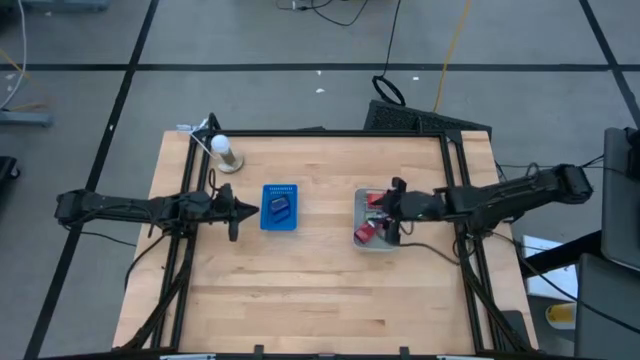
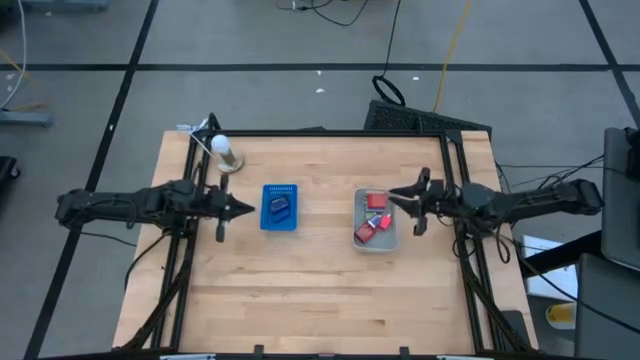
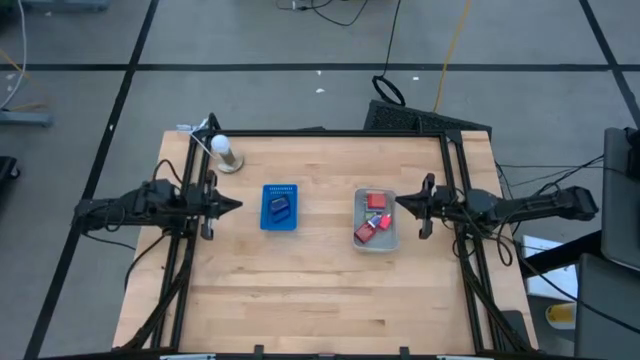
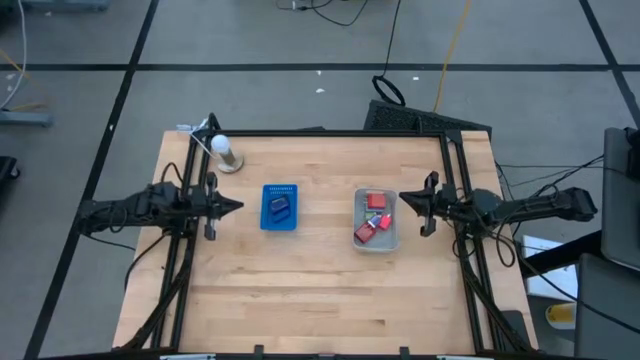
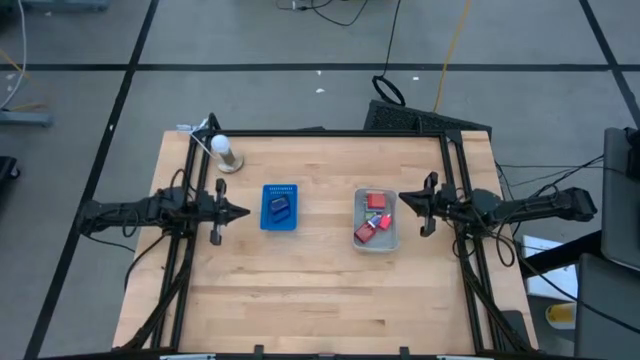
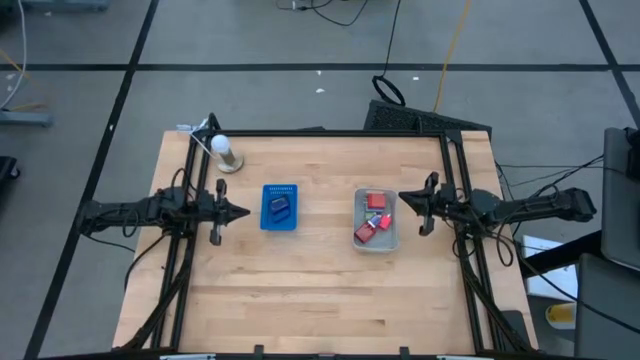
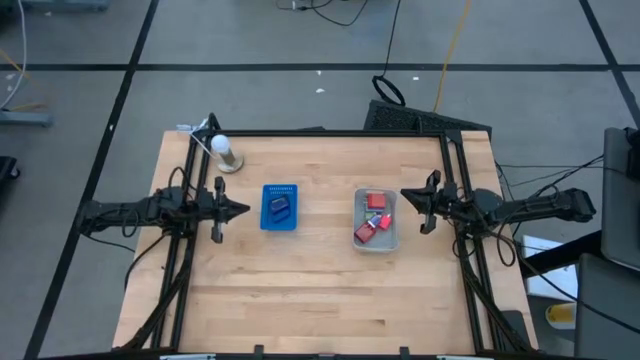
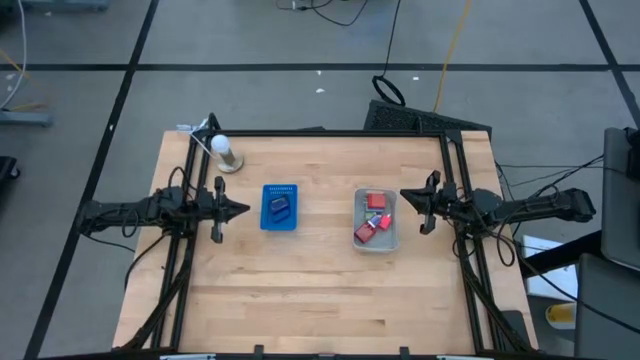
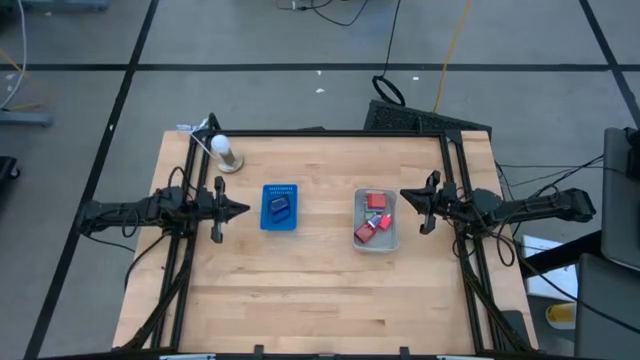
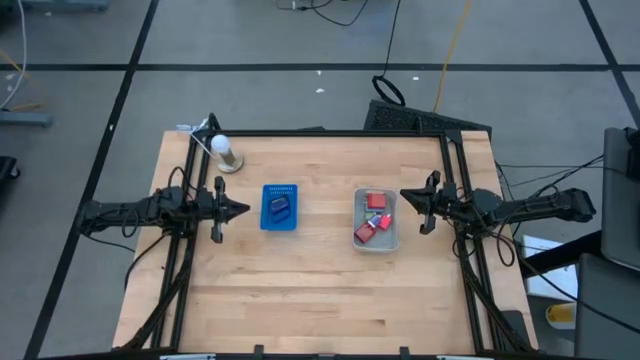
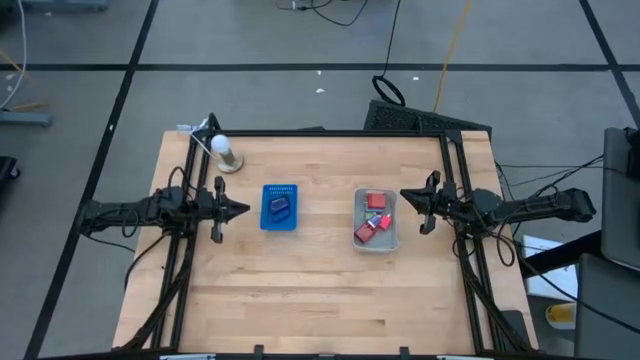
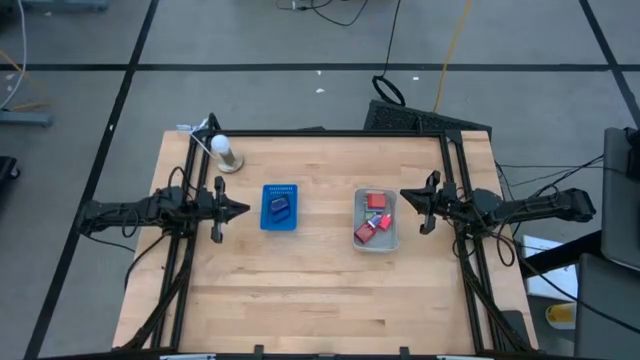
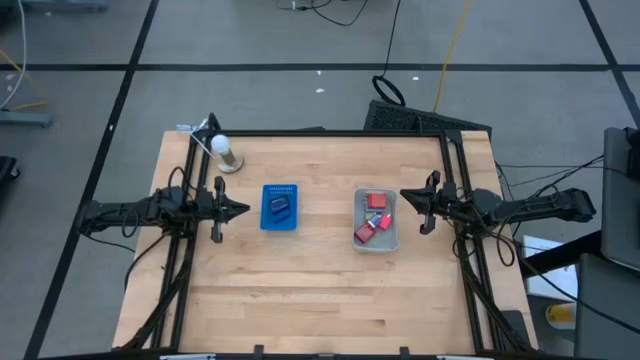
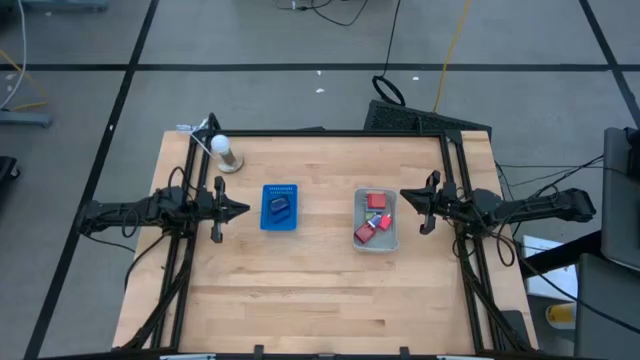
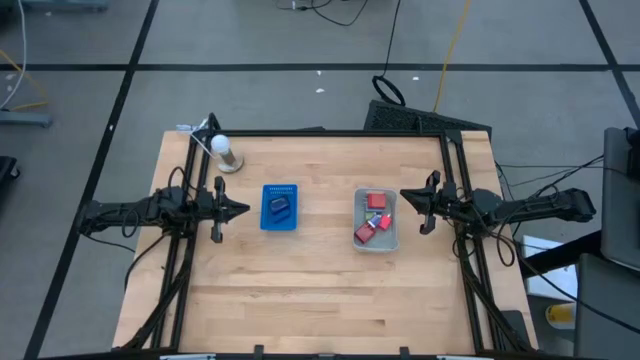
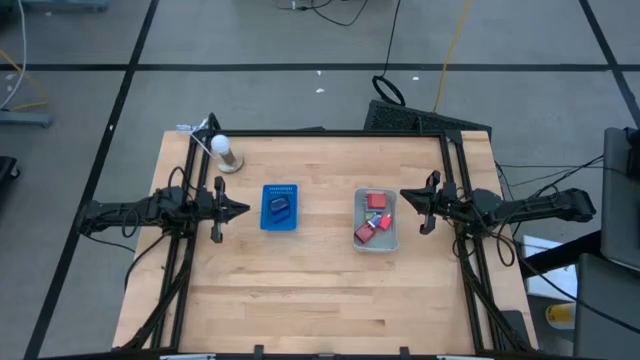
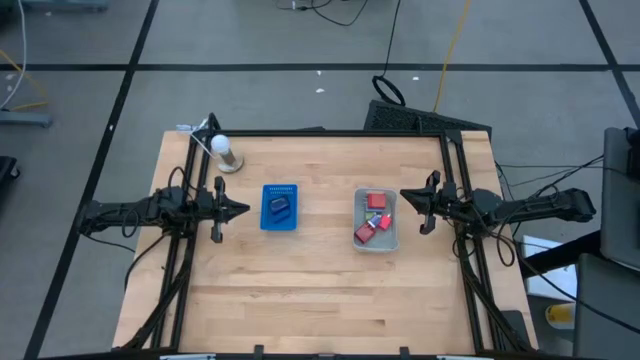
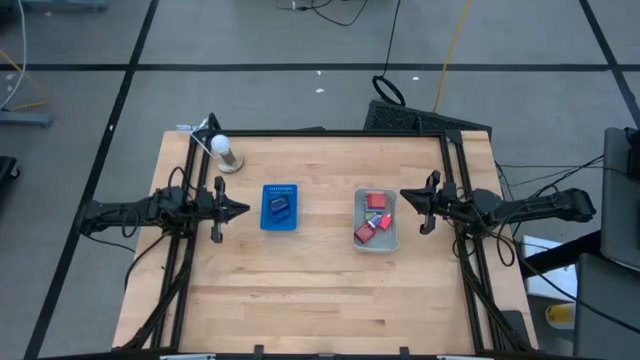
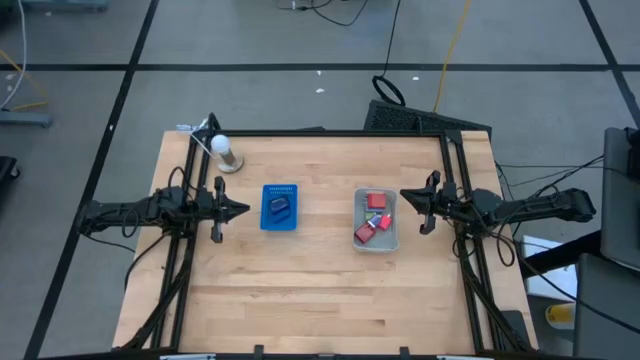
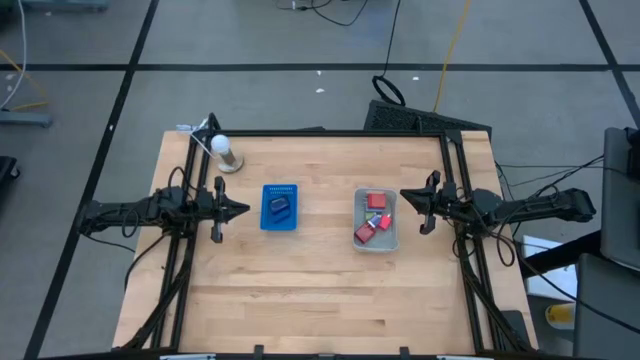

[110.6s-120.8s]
Task: Pick & Place Office items
Return to home position

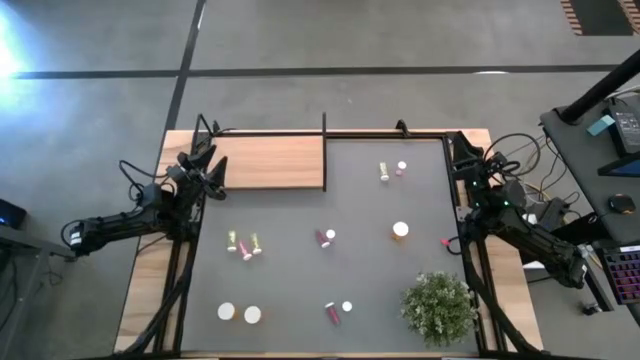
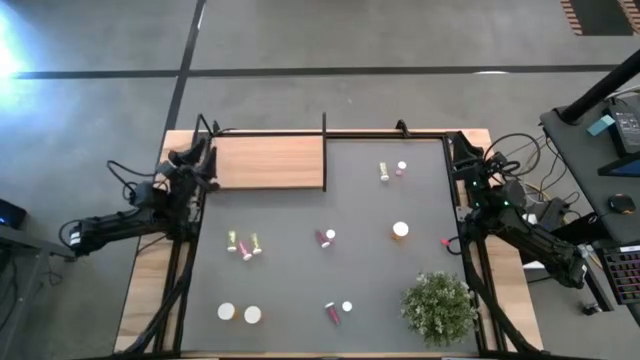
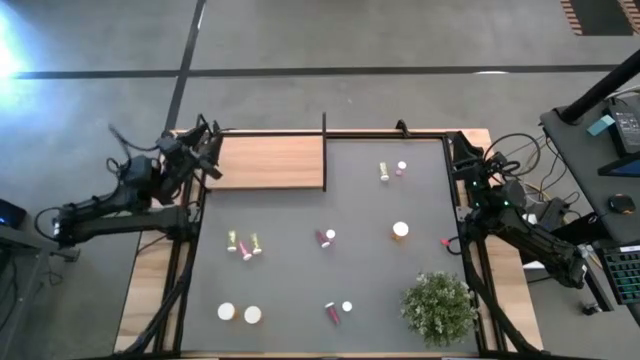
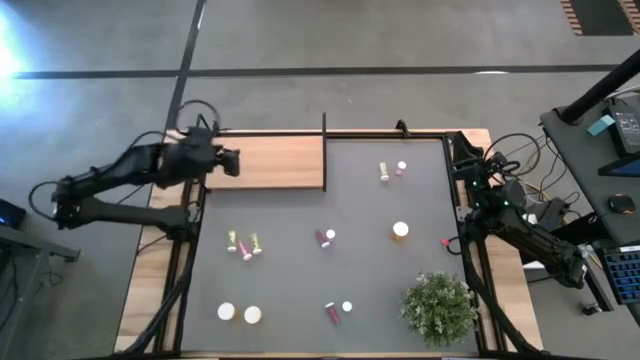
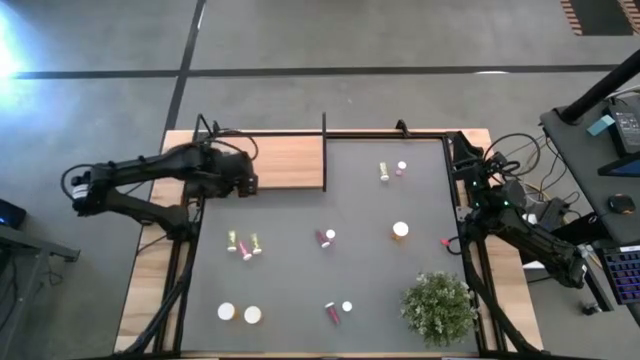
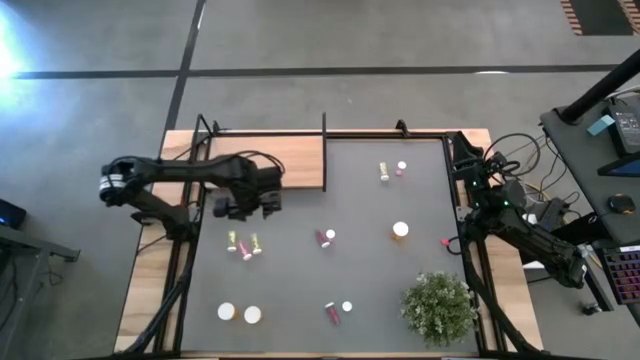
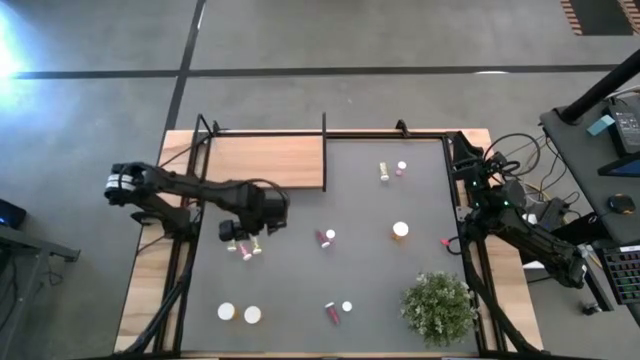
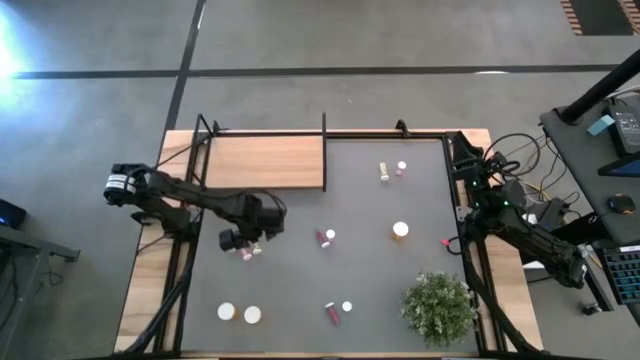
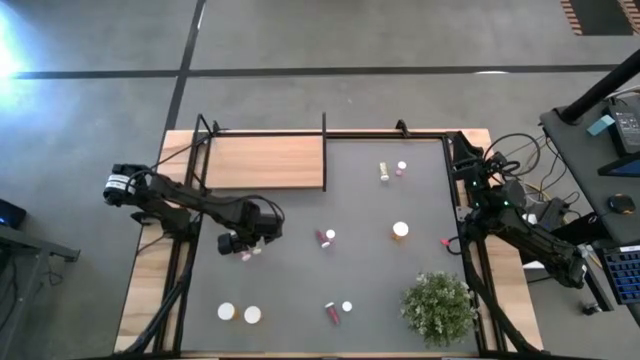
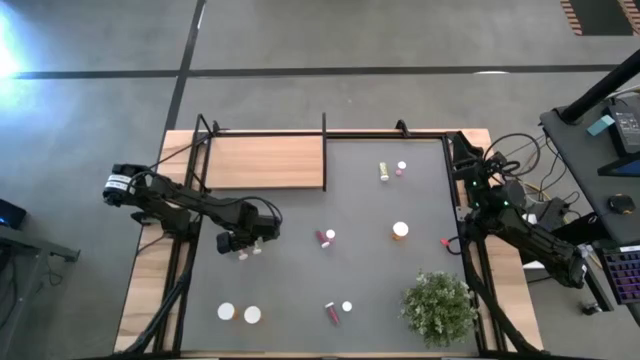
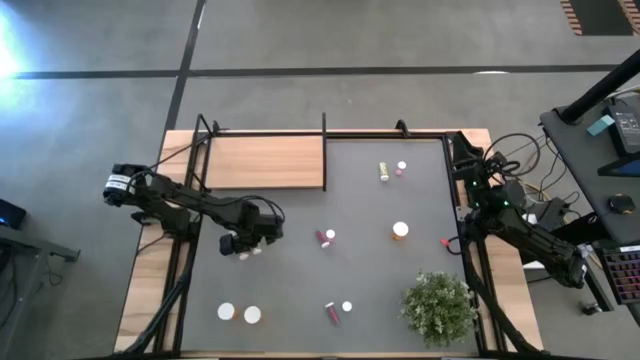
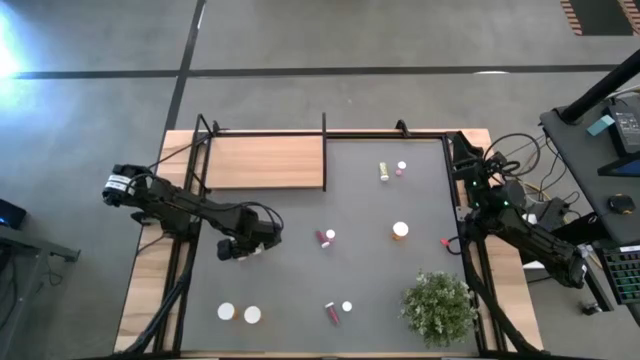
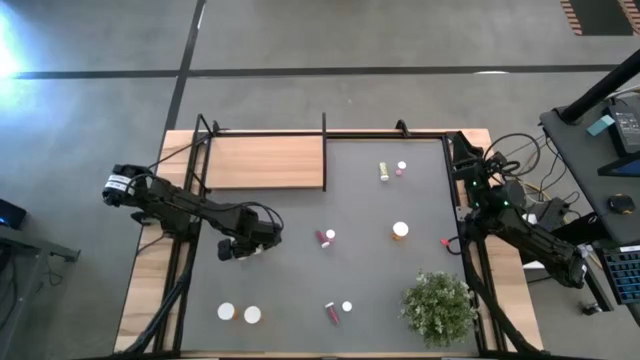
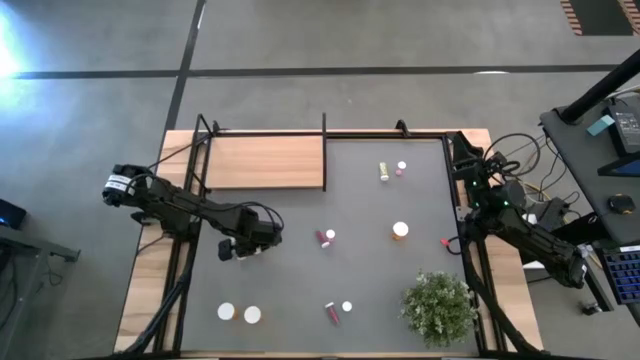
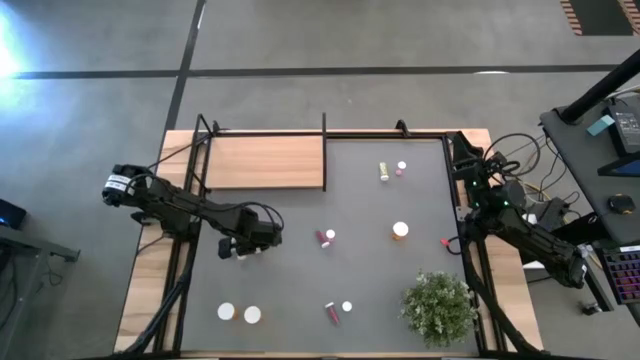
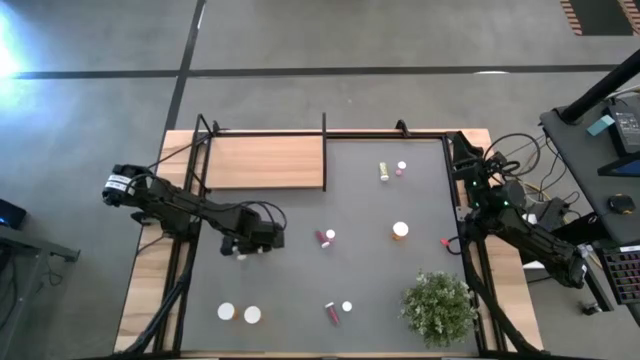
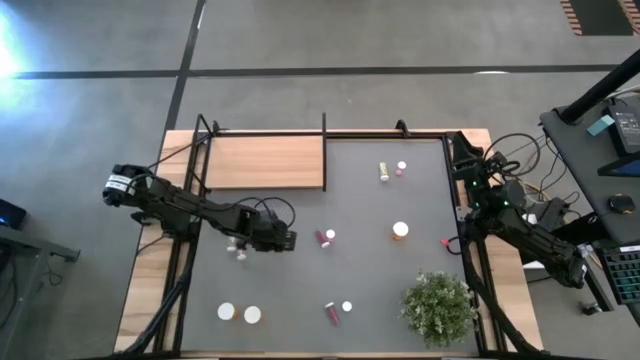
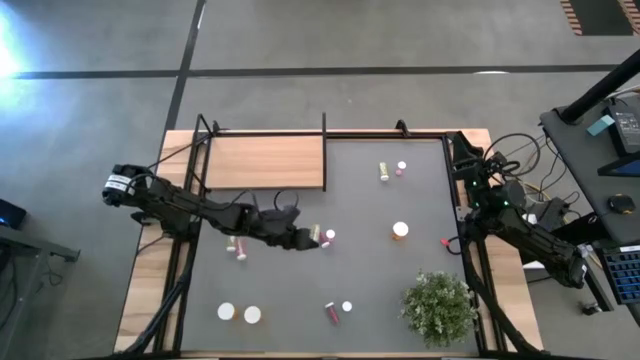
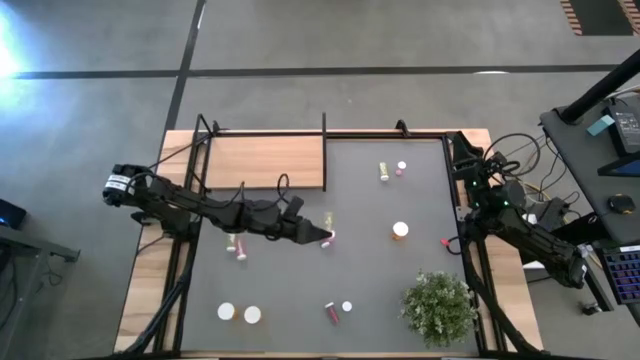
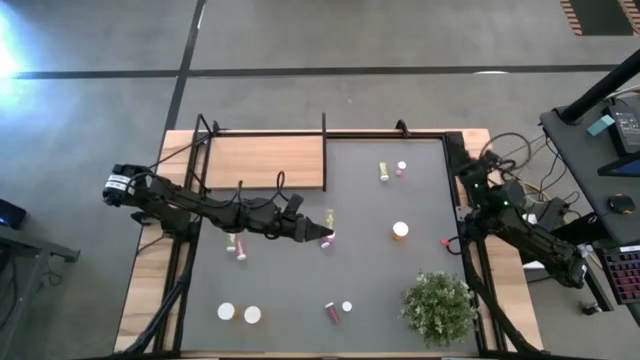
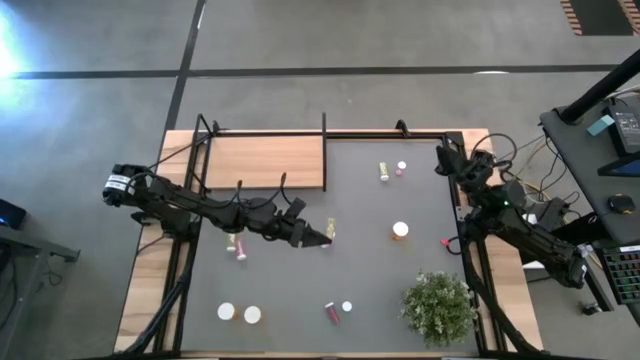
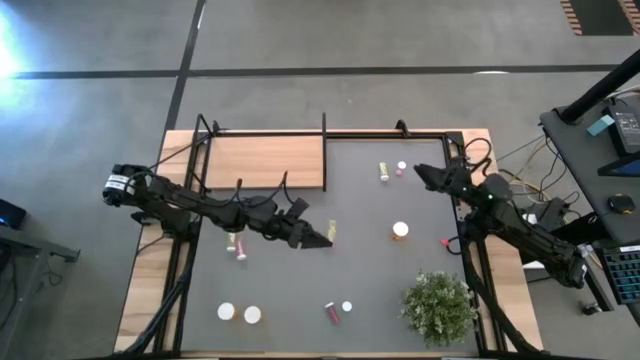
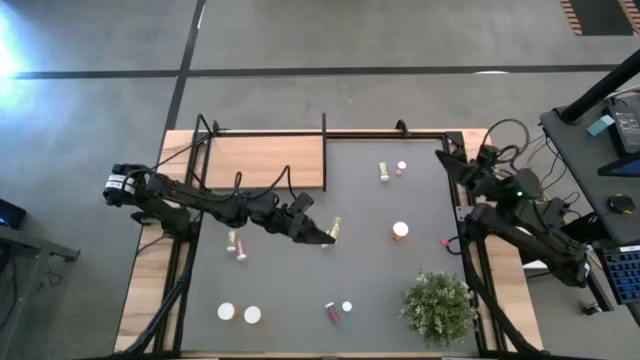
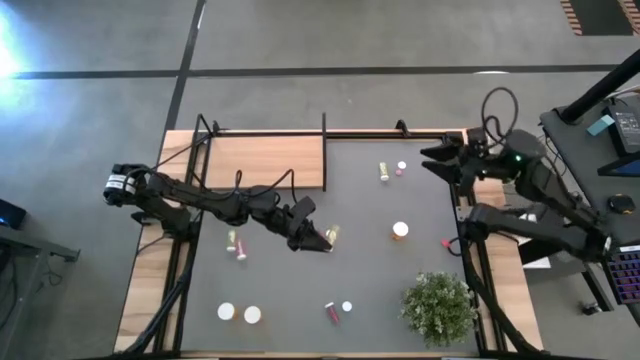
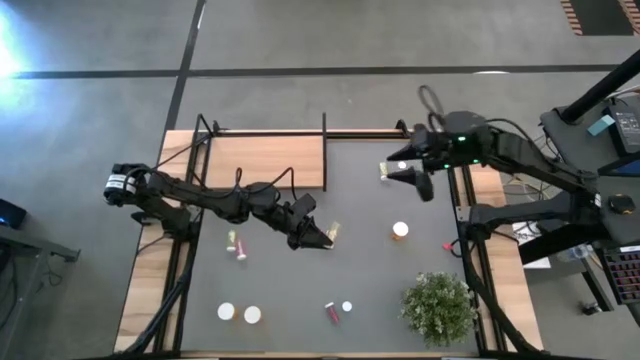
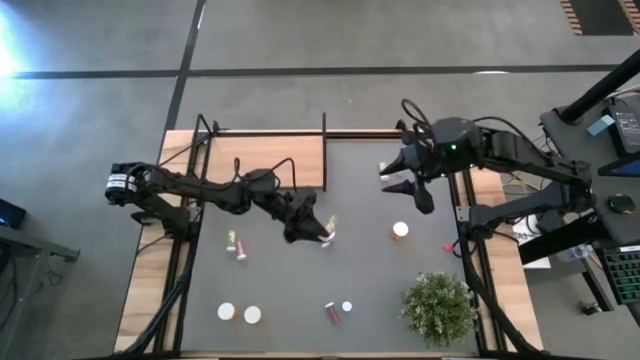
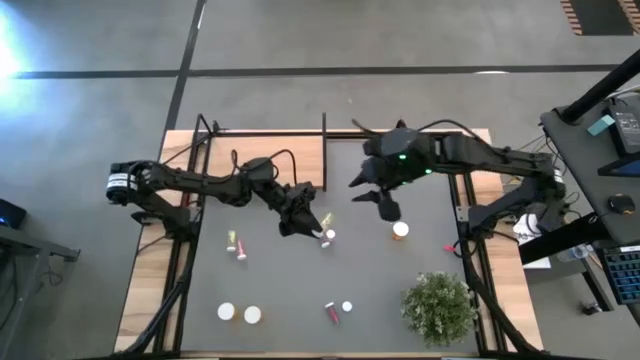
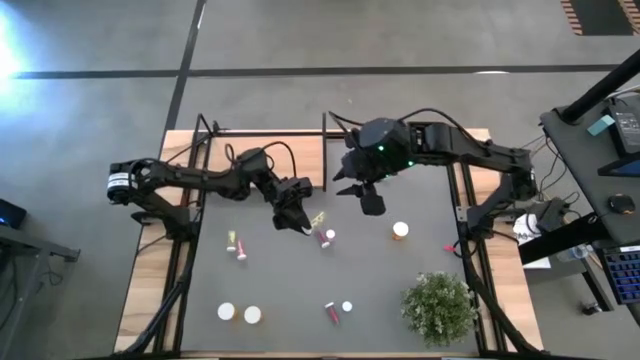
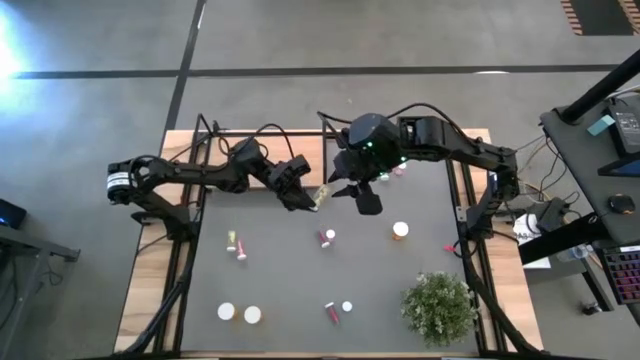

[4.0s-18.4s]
Task: Pick and place medicine bottles onto shelf by color
Put the middle yellow pill bottle on the shelf
